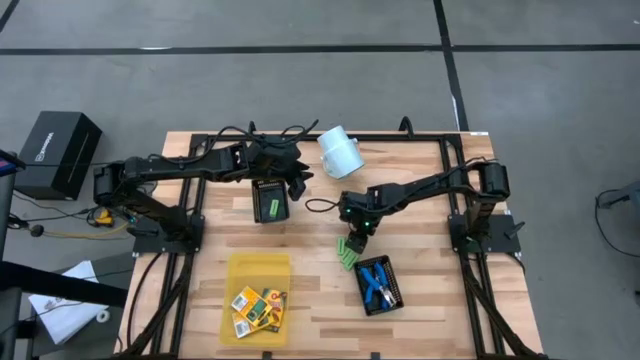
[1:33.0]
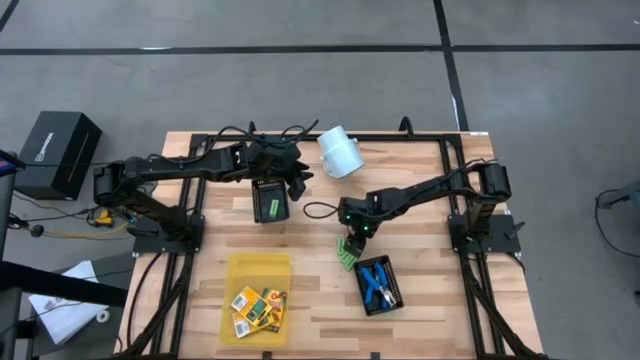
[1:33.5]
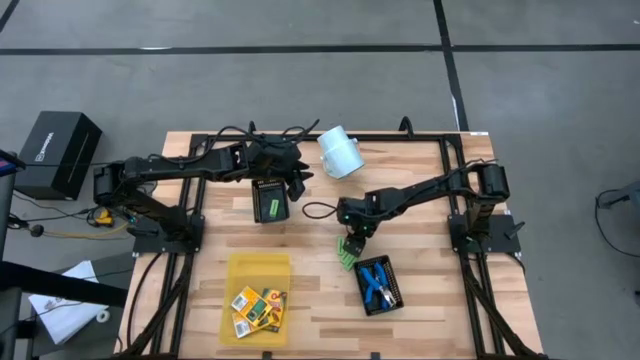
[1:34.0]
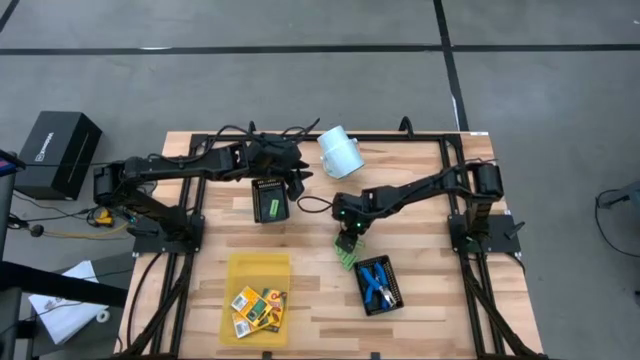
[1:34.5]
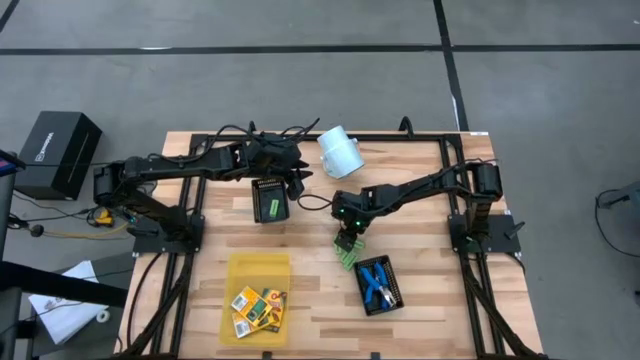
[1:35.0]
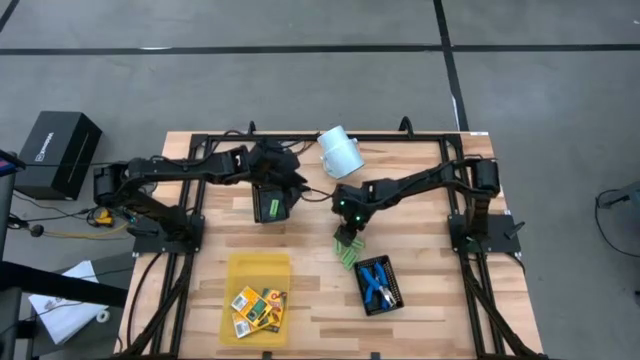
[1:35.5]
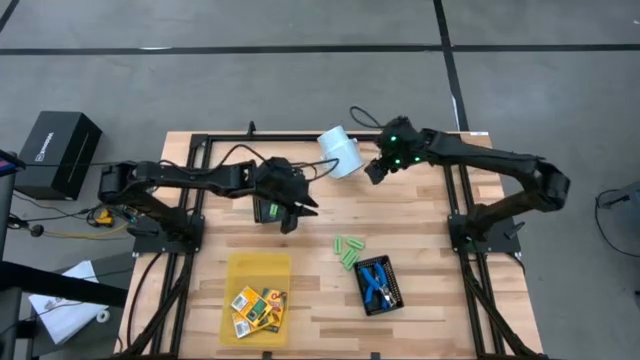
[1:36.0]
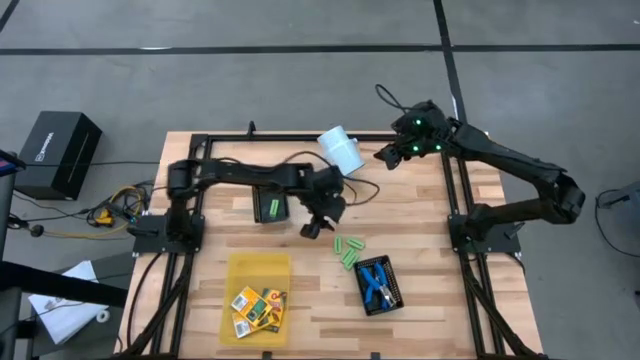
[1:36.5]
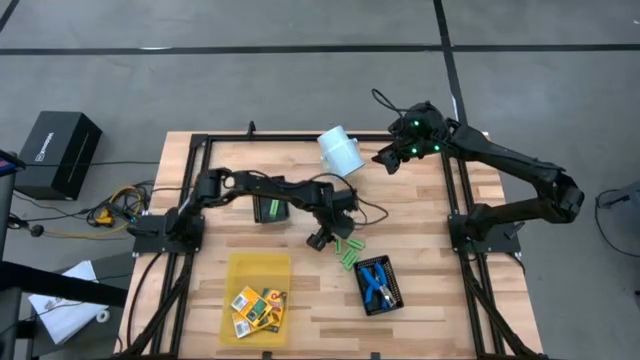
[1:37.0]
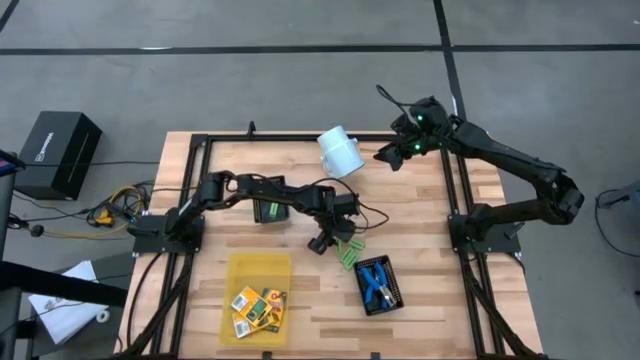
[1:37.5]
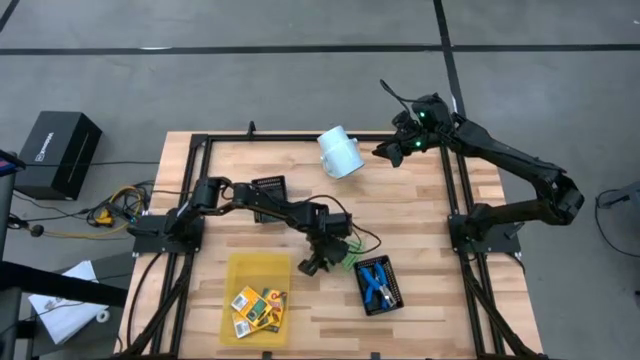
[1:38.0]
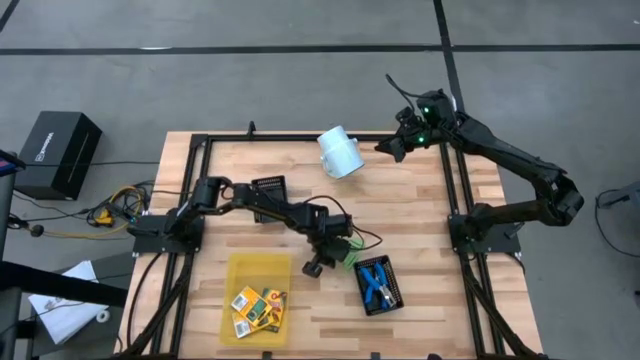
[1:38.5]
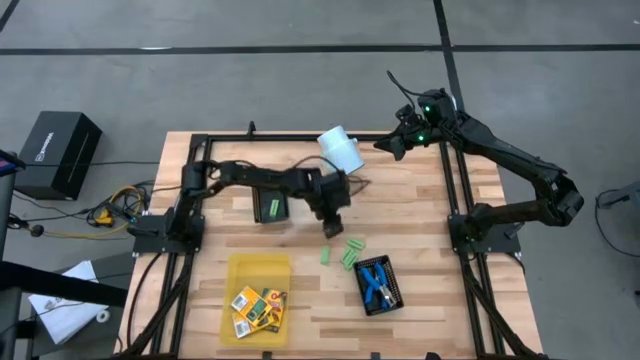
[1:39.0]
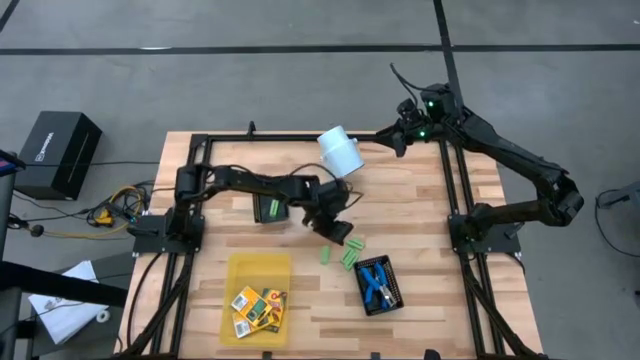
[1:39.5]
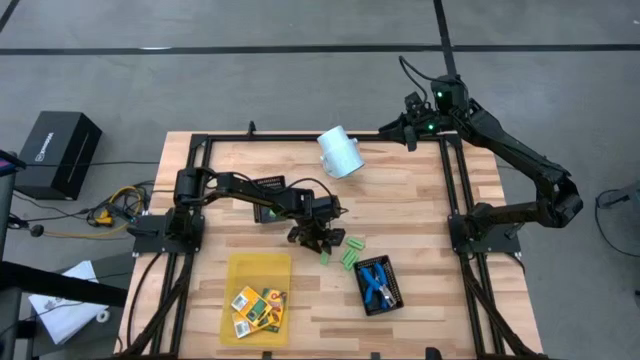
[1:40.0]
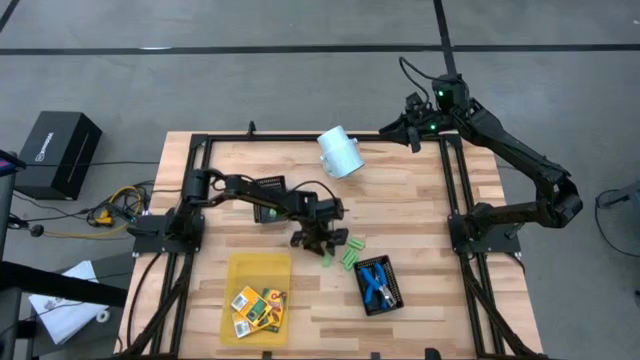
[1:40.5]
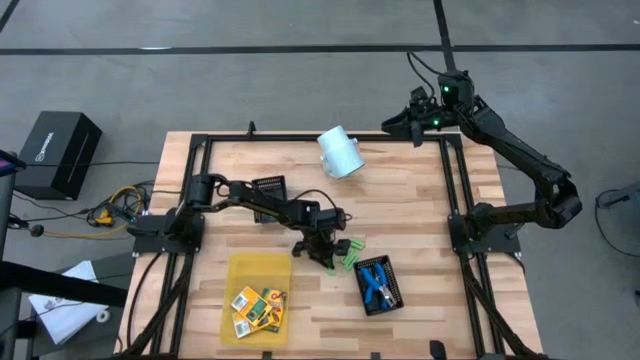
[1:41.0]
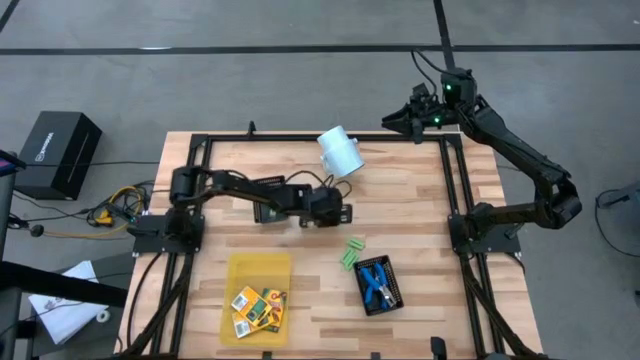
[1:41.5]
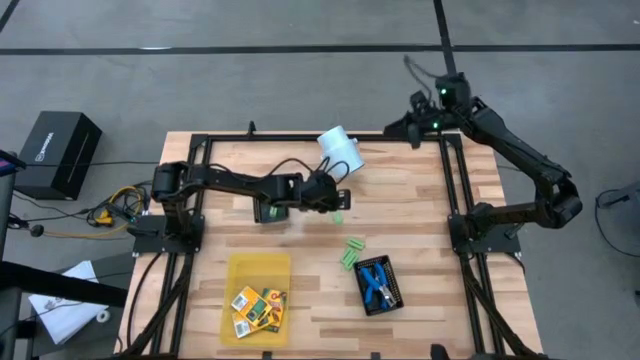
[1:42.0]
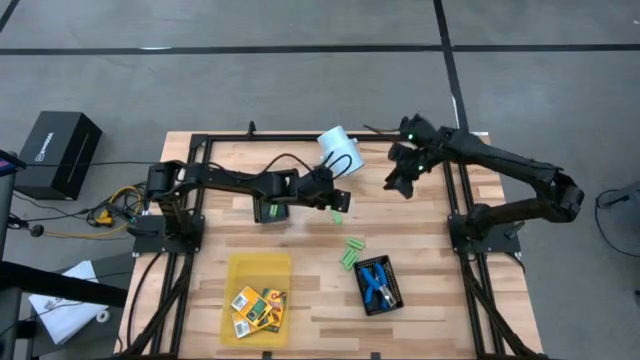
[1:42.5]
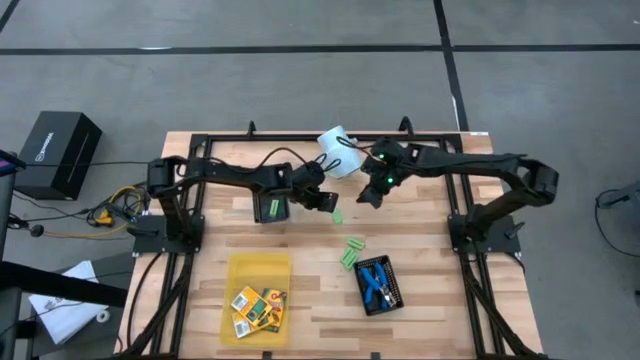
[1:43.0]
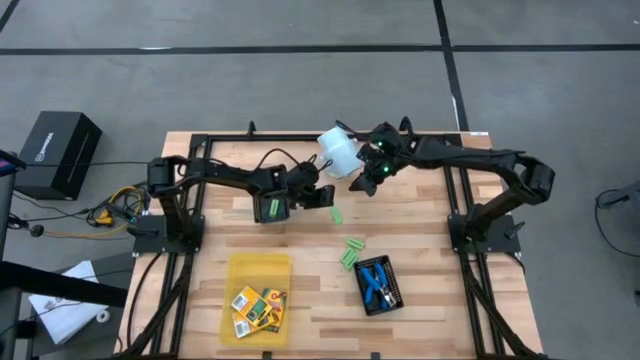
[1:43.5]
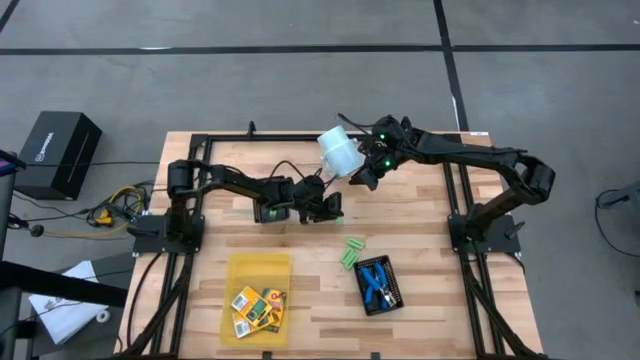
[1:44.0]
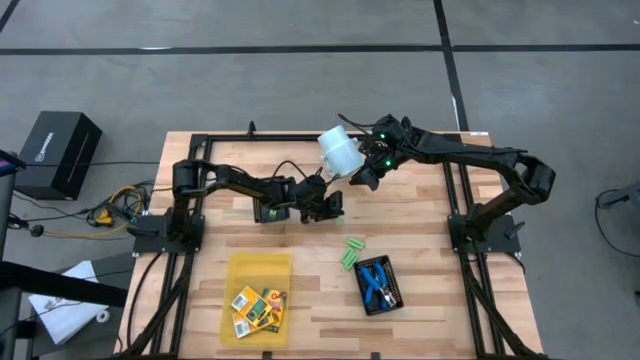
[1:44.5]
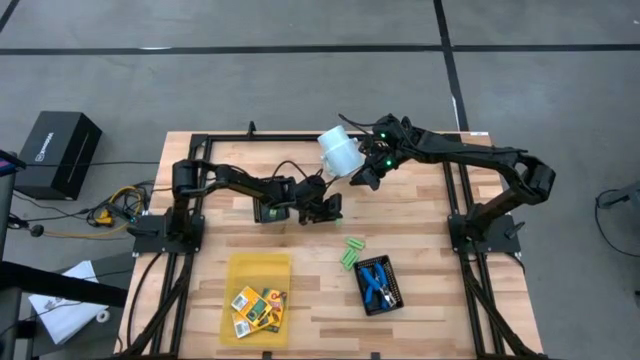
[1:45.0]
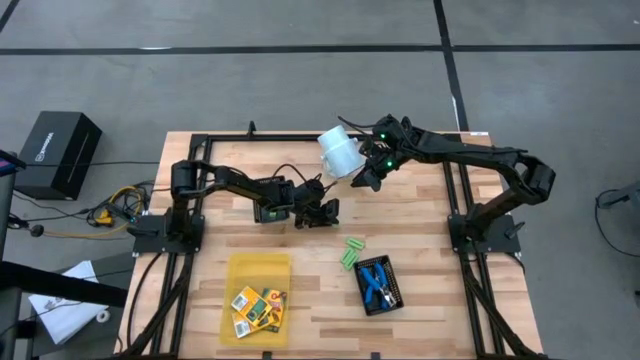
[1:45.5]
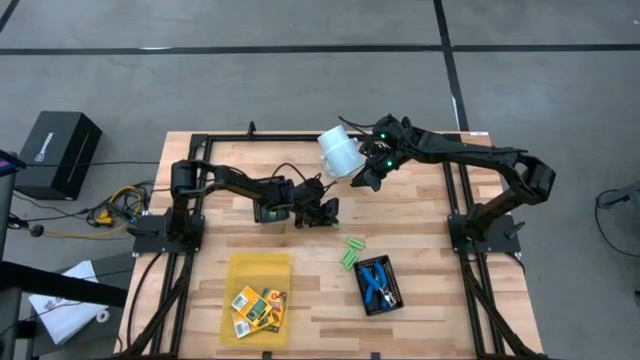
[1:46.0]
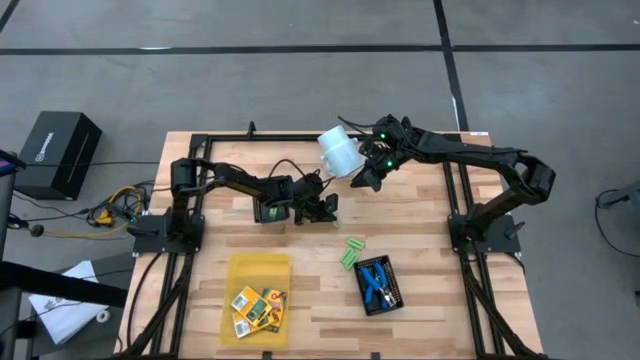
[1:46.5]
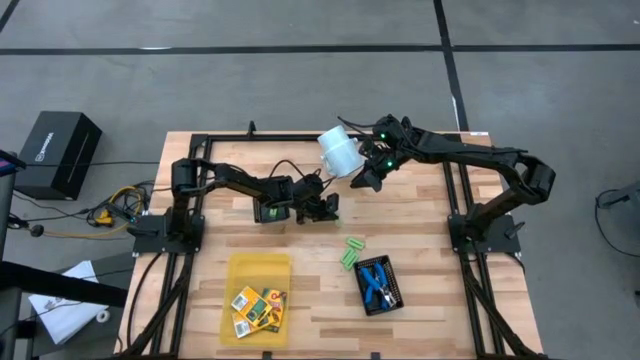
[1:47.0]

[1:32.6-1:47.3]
Task: Pick & Place School Supplies
Put the green eraser into the top black bin

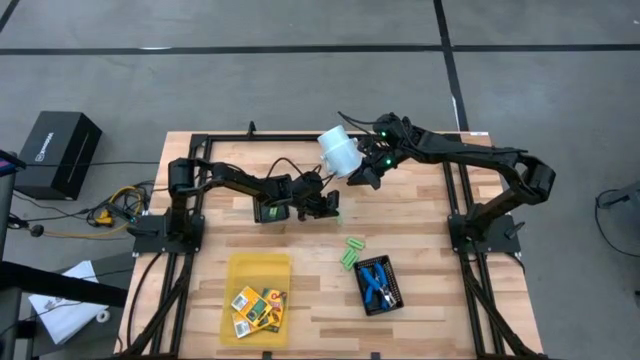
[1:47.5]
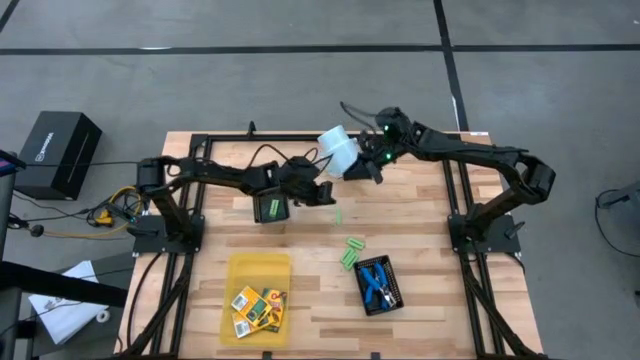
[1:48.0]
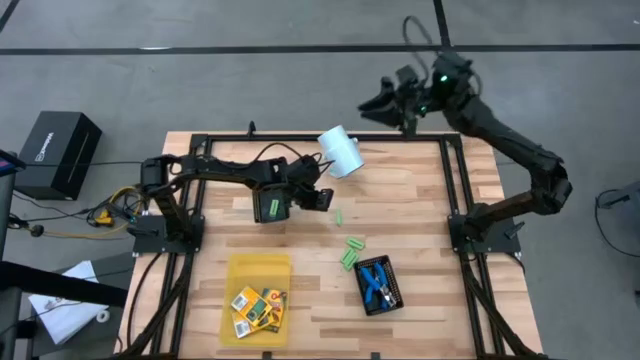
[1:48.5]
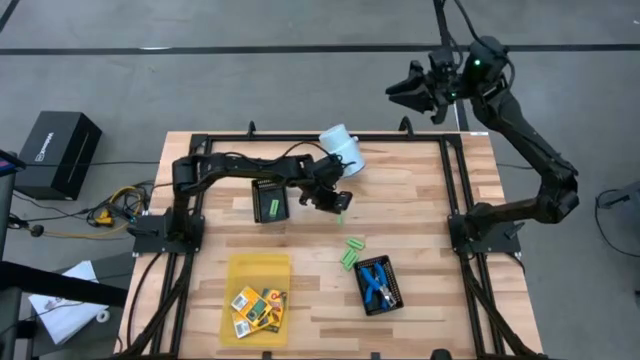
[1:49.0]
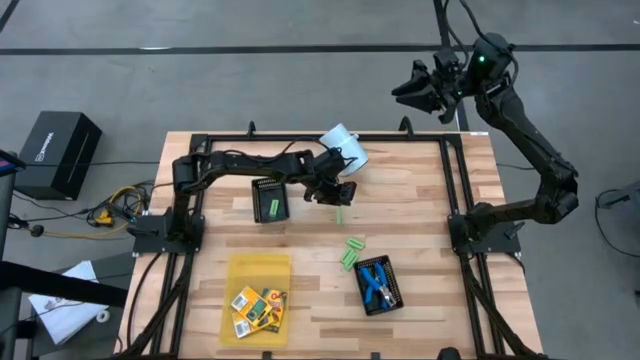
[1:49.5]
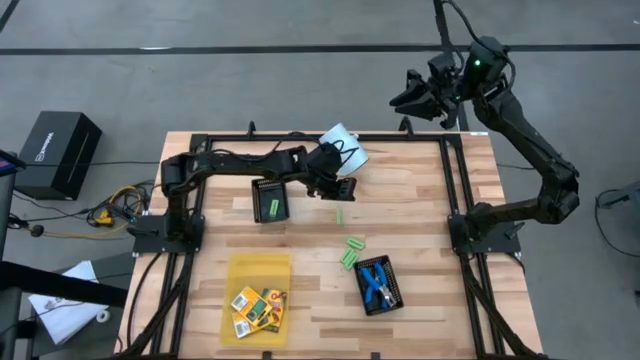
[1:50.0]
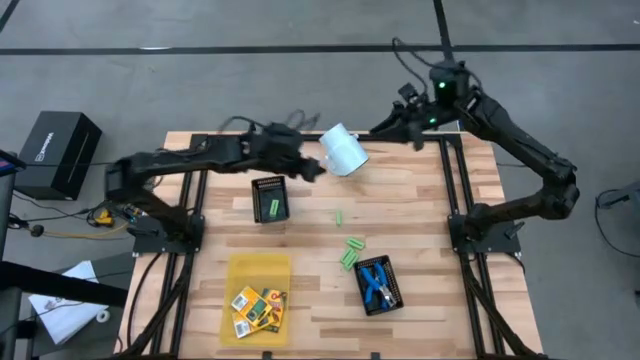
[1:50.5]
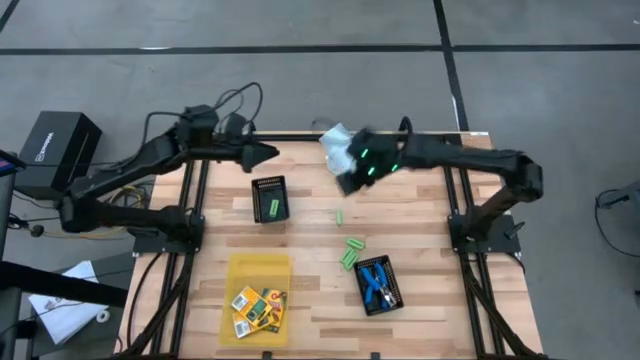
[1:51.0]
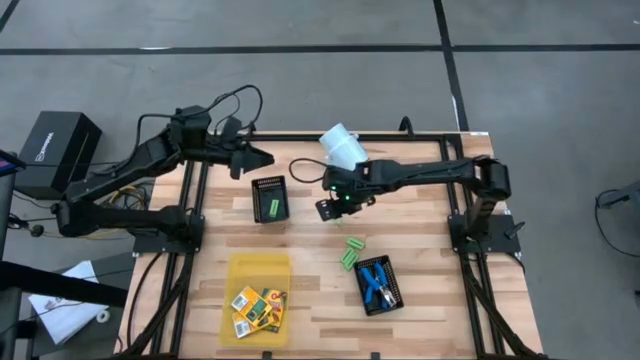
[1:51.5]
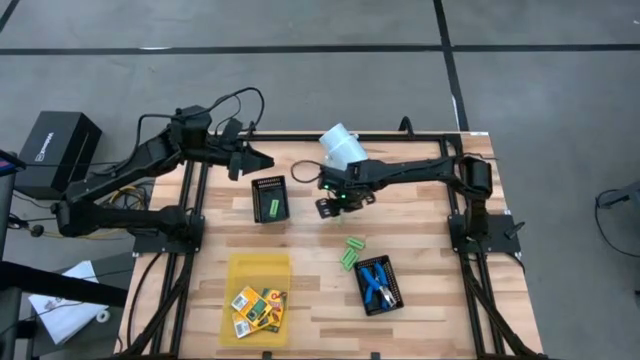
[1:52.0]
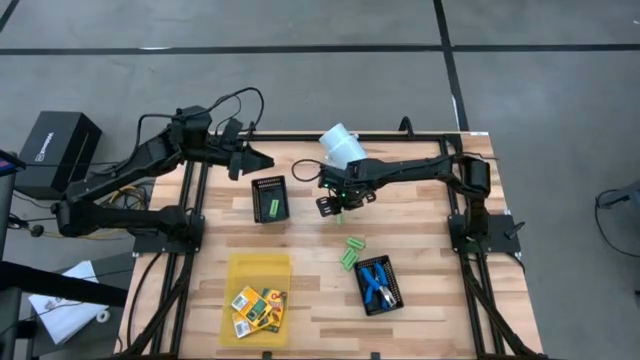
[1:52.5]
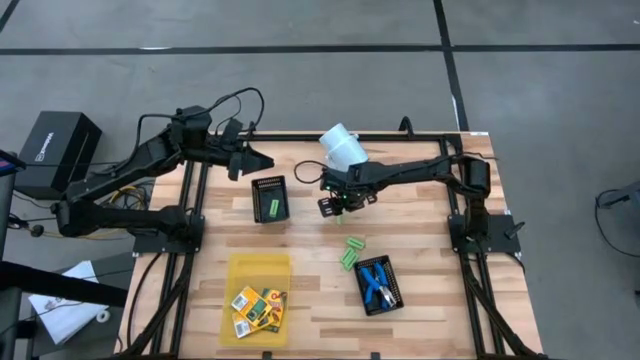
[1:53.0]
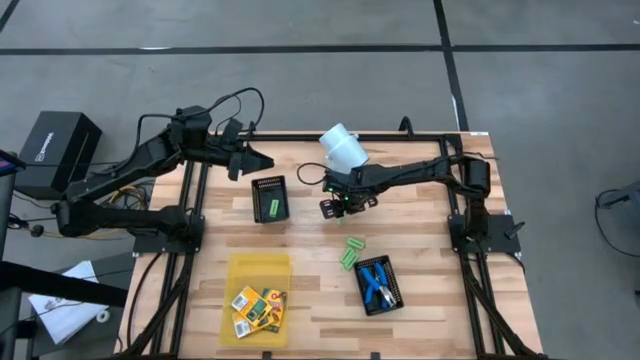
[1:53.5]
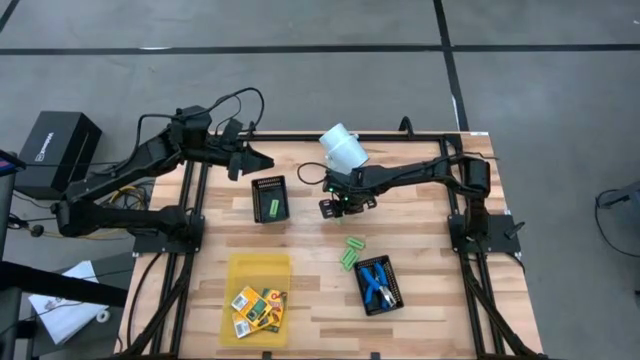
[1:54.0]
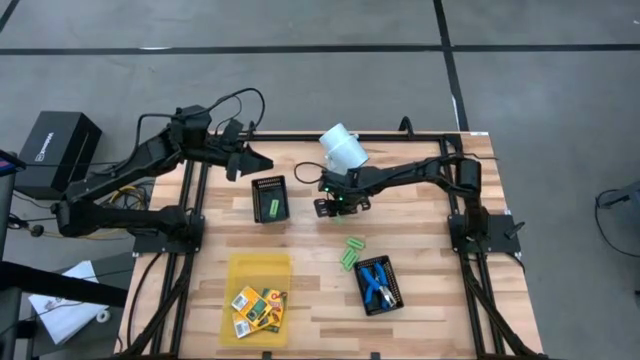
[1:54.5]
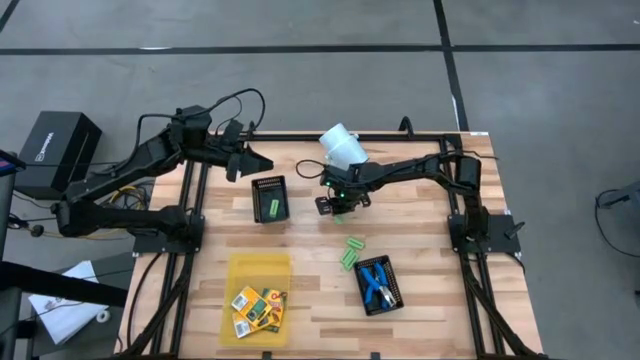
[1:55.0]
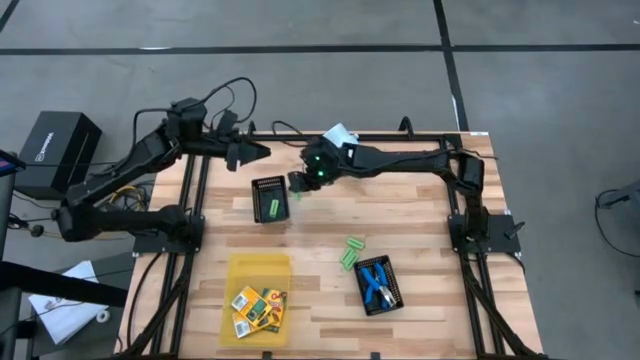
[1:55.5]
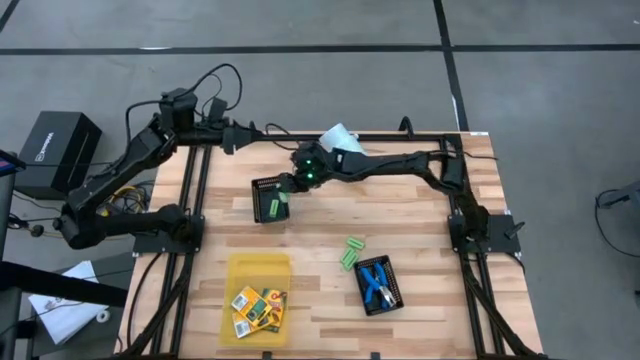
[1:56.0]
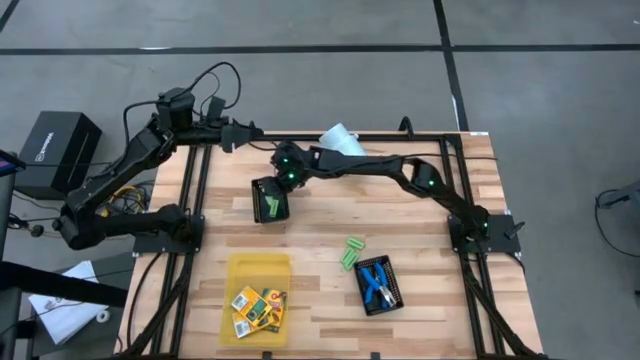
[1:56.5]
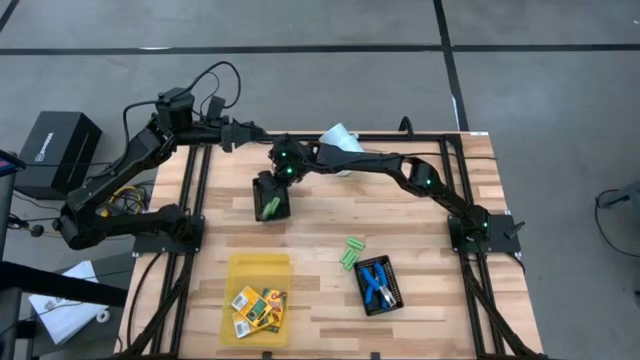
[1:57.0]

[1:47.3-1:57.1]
Put the green eraser into the top black bin
